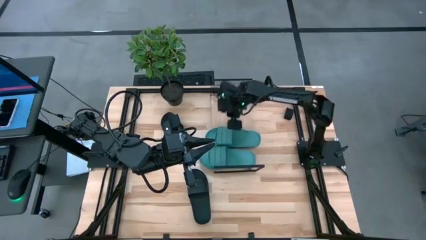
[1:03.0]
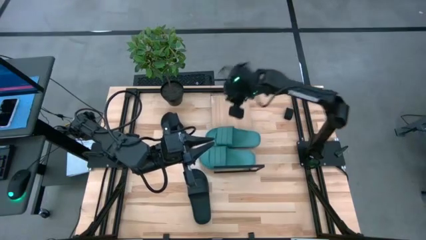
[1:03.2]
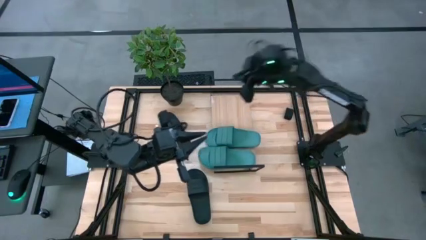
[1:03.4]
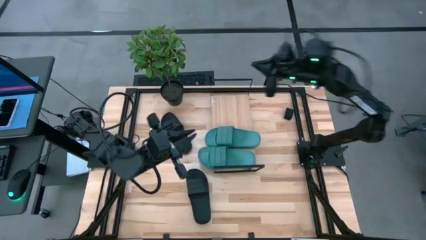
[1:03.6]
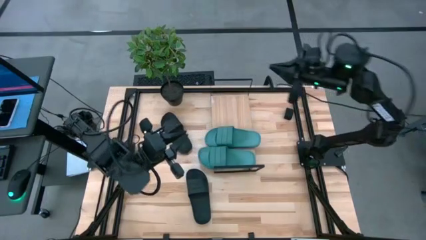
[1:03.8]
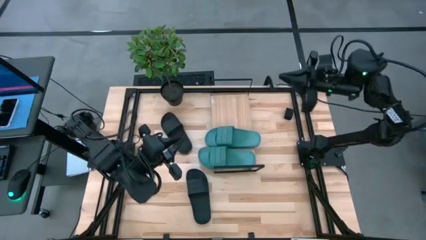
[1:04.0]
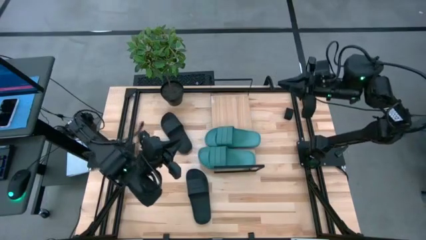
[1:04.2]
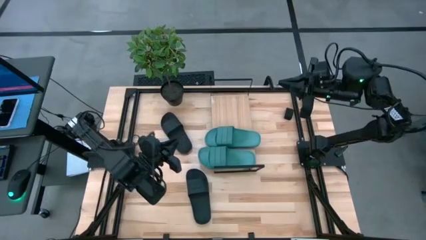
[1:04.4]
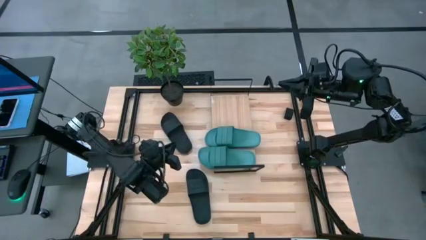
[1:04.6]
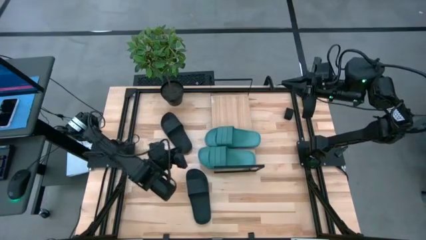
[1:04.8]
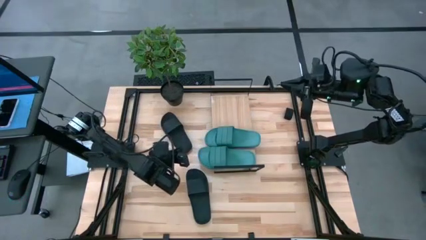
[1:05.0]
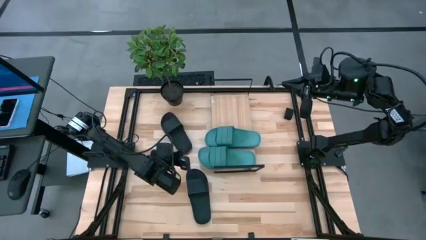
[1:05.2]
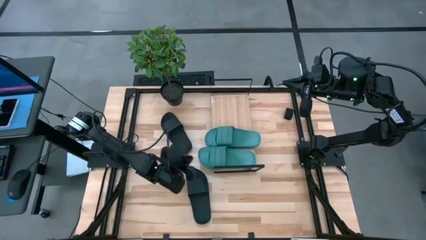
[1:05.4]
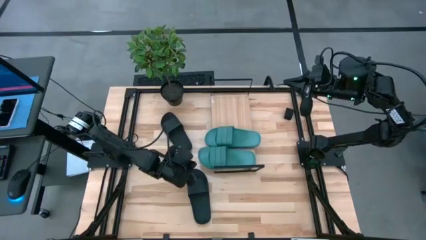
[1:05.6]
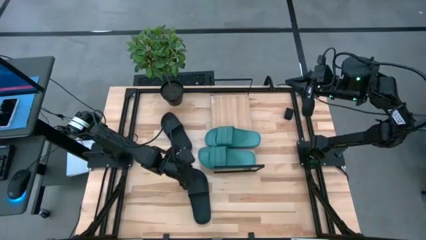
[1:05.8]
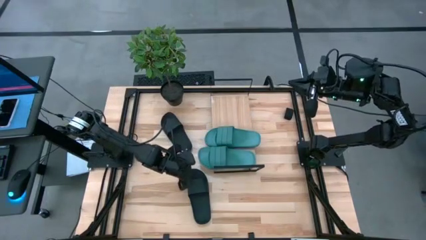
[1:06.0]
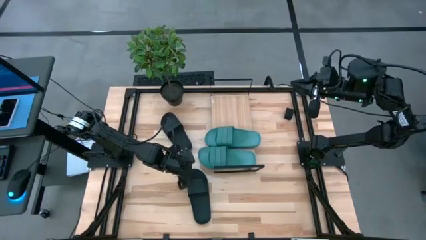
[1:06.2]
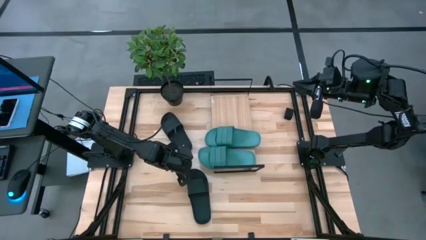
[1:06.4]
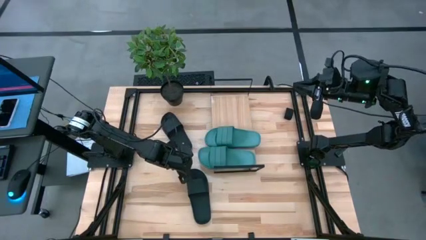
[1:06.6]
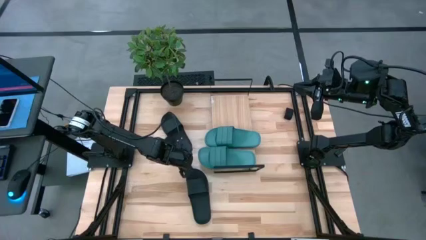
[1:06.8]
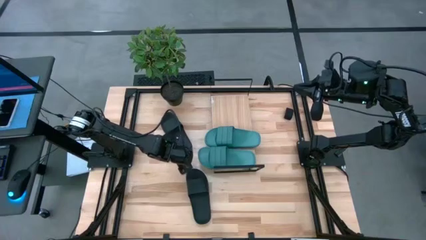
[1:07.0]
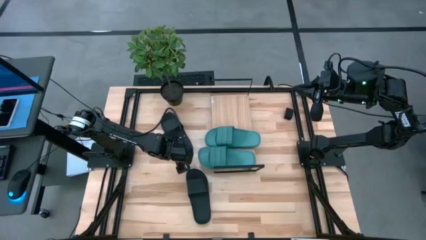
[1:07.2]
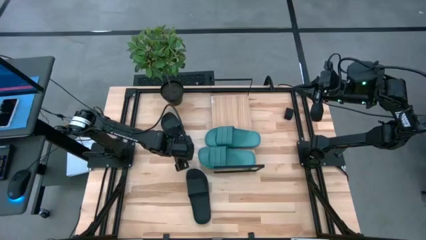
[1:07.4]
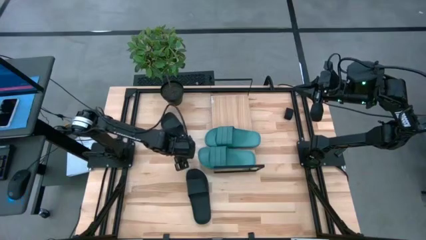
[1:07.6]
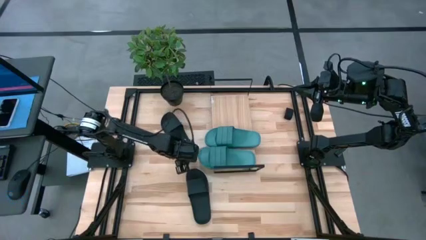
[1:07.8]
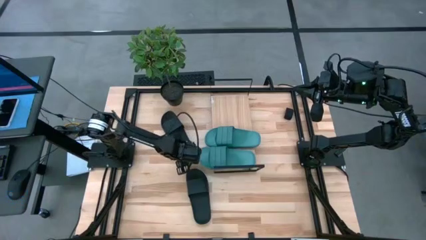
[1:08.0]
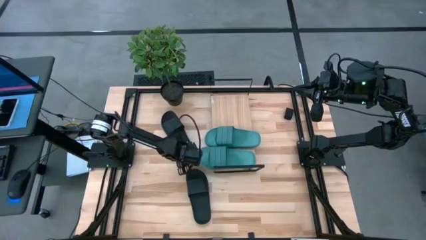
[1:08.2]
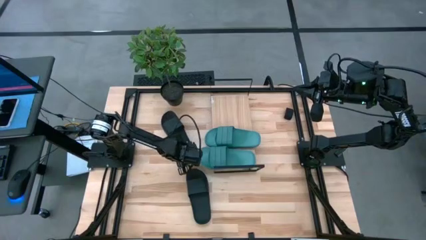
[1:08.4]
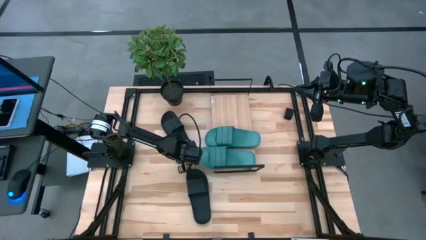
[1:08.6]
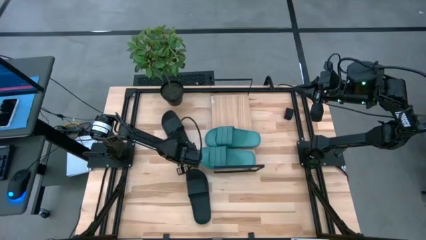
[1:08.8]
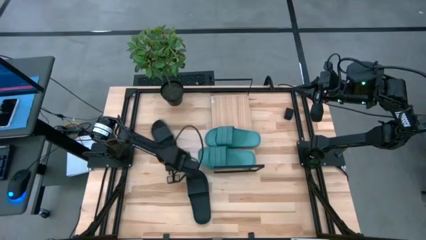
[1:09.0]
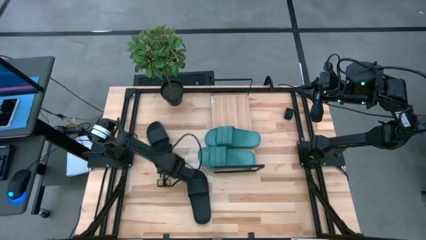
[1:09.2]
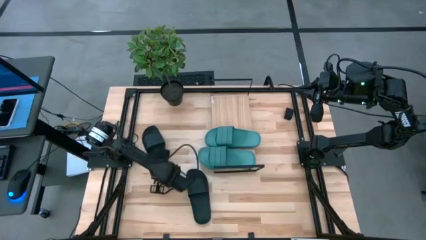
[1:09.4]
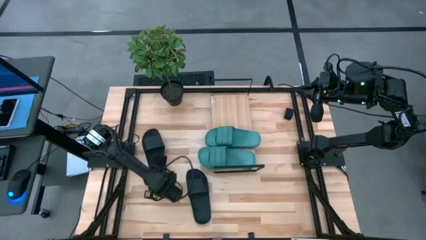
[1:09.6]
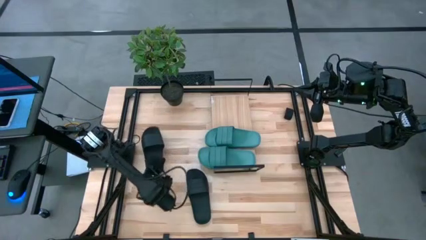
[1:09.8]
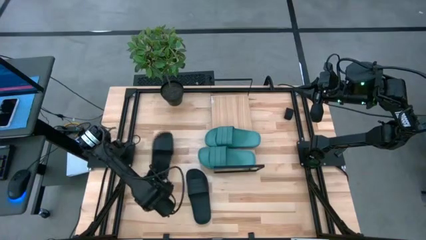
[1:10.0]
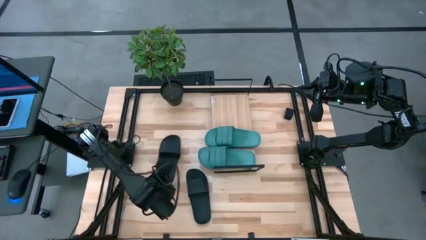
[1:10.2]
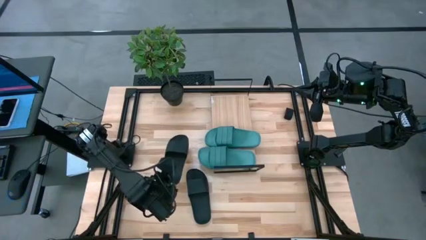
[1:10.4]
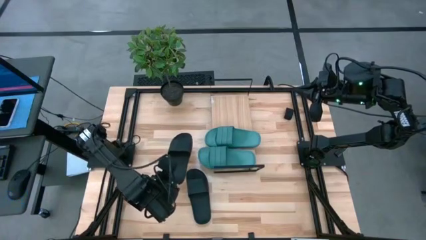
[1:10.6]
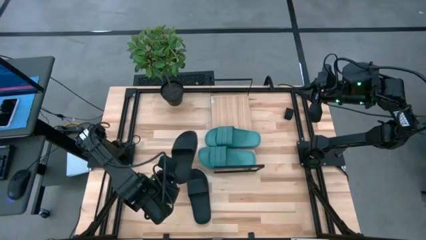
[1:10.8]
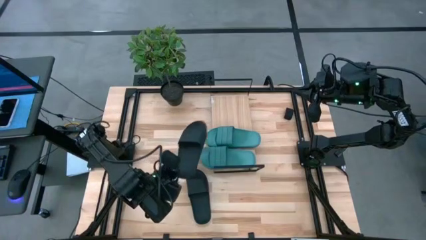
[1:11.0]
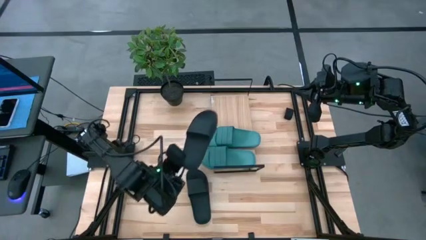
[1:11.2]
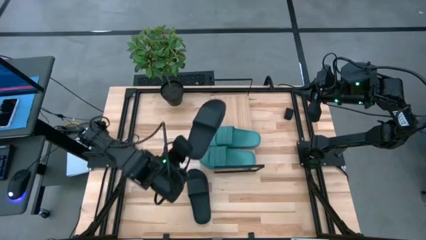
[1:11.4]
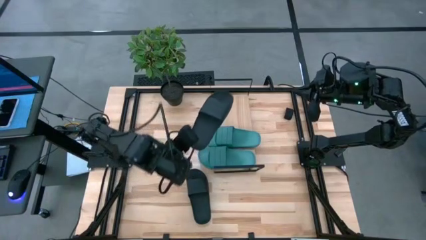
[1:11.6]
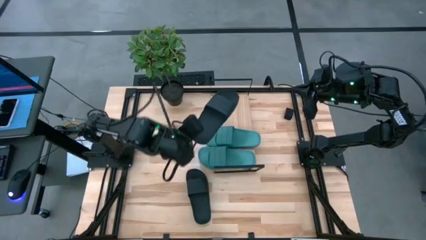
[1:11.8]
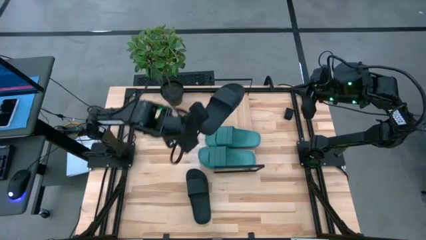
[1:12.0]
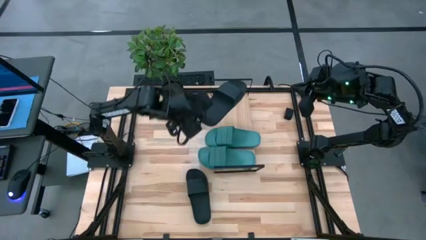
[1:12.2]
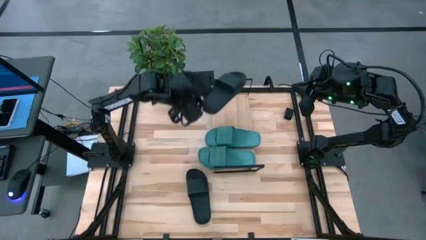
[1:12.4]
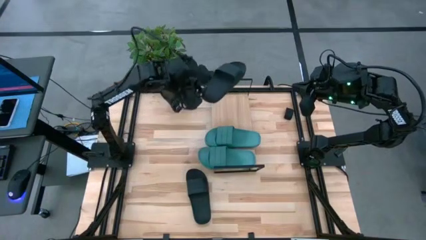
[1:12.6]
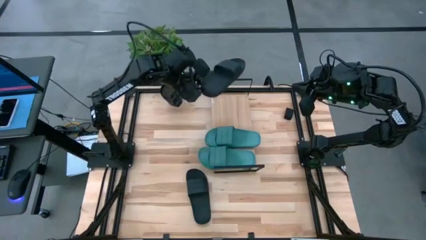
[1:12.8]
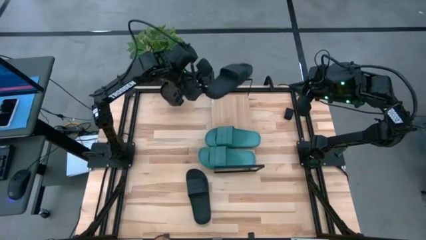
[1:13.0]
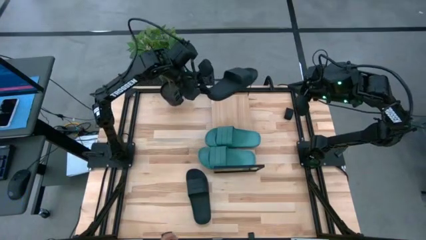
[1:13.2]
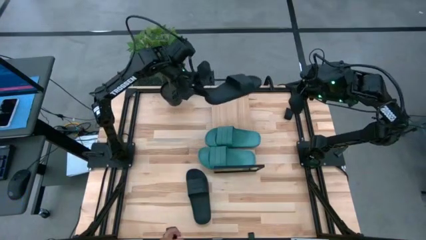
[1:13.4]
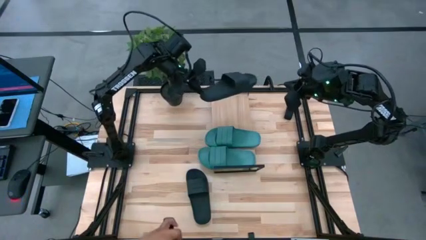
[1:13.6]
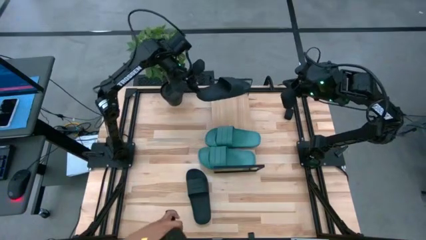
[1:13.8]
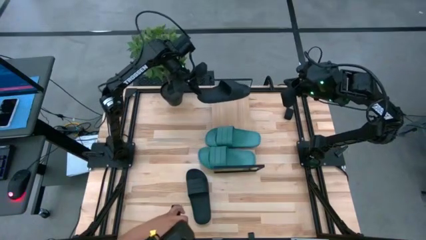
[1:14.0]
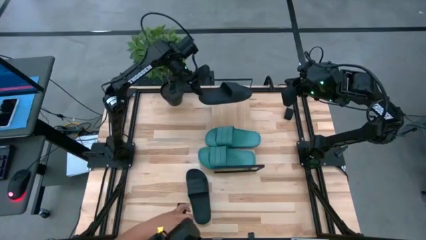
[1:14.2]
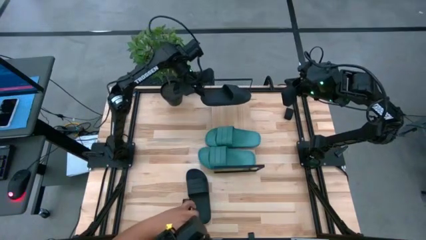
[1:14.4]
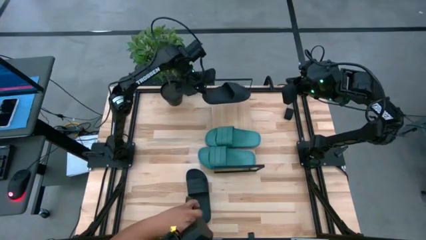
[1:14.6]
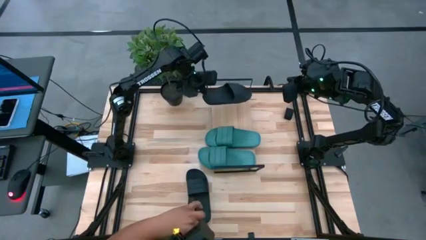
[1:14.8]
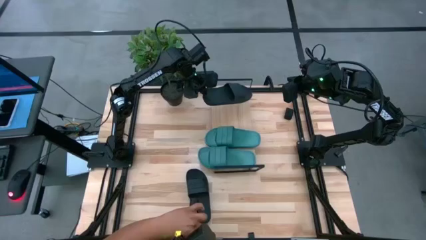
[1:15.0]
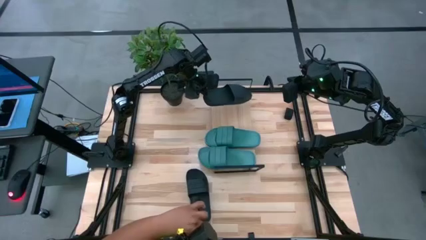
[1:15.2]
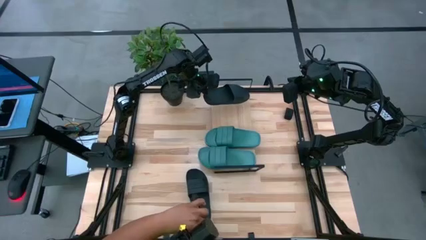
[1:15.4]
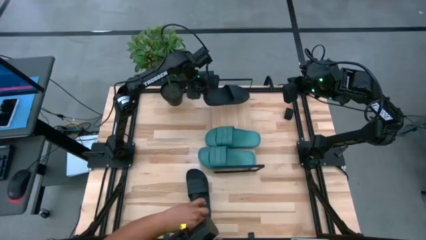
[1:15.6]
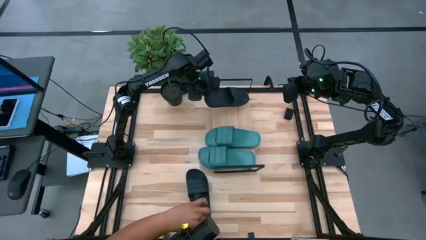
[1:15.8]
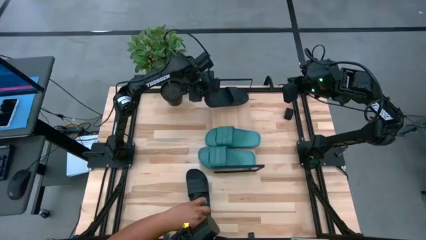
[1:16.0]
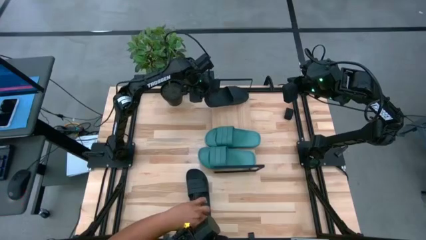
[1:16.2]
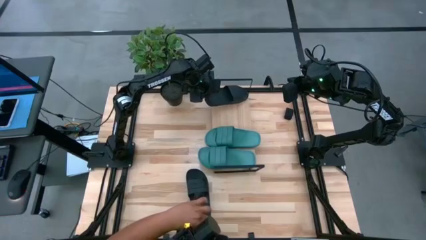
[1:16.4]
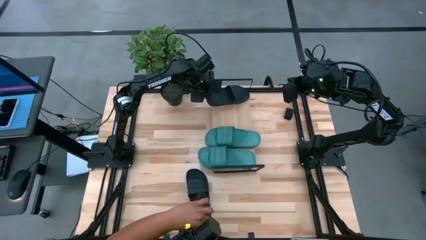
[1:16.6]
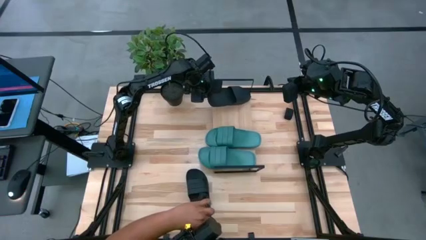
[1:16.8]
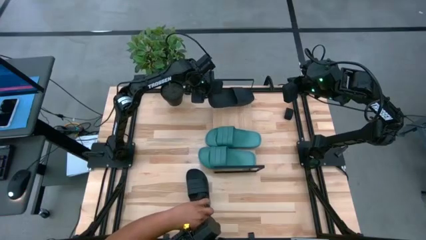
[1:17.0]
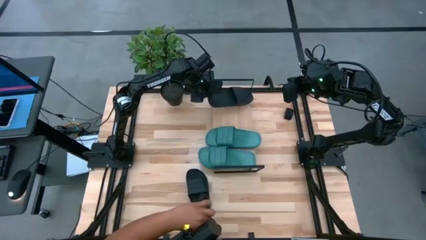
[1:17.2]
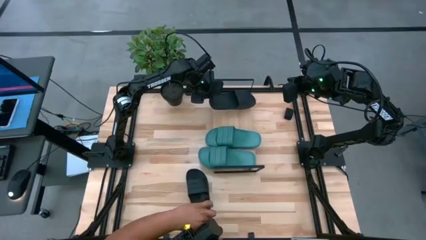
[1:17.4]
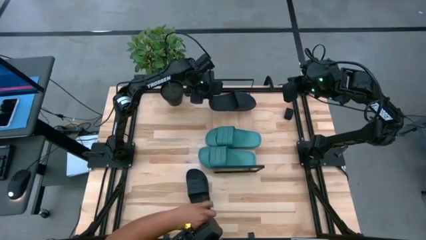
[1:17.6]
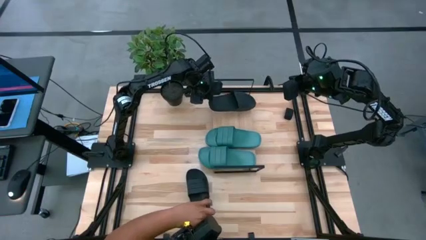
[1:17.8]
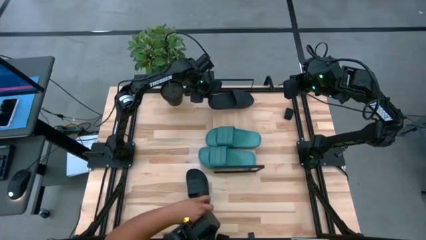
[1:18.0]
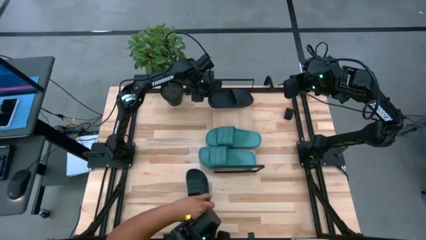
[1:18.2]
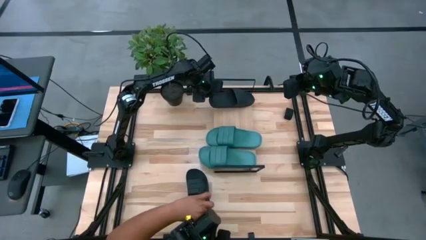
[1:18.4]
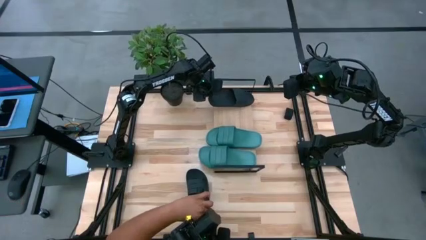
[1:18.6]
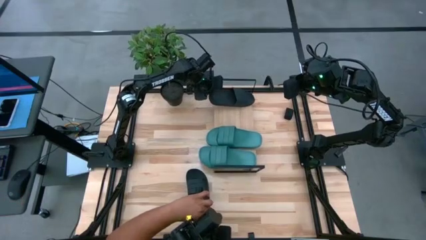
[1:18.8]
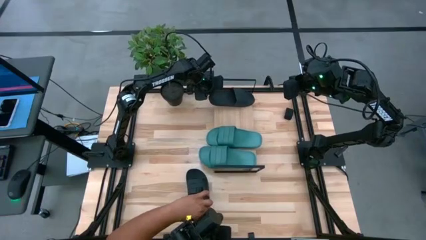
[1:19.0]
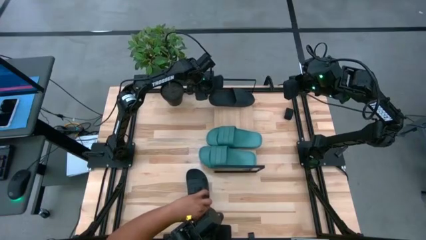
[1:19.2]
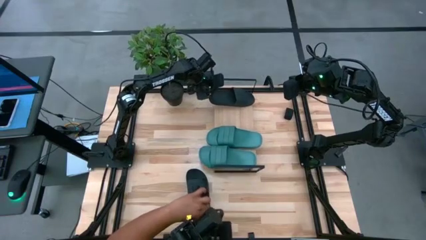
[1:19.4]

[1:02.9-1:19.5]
Task: Pick and place slides into the shelf
Put the top black slide on the shelf
